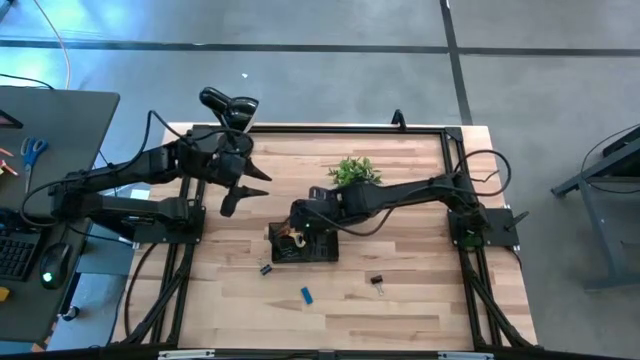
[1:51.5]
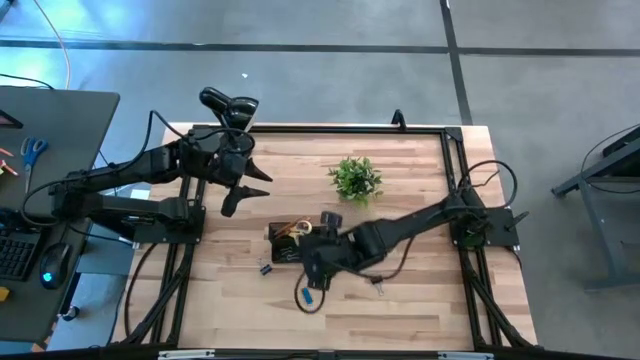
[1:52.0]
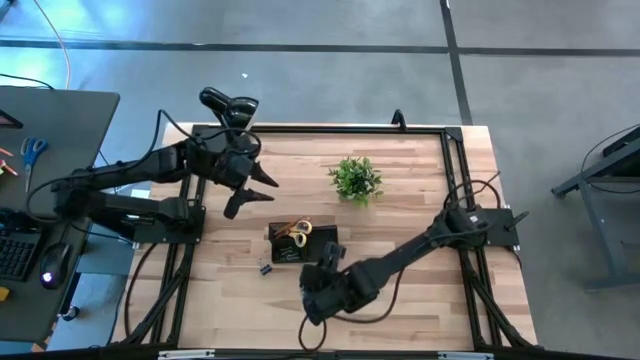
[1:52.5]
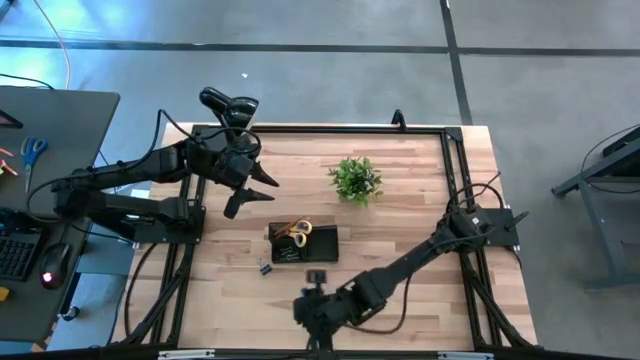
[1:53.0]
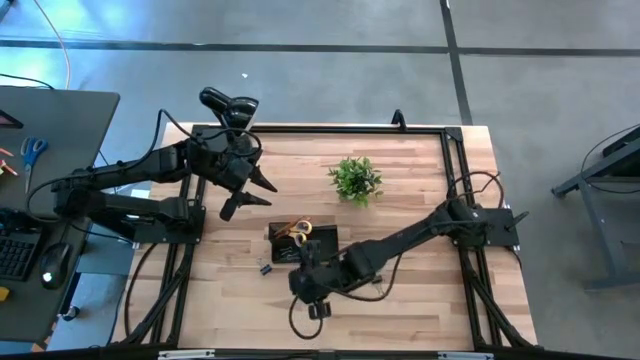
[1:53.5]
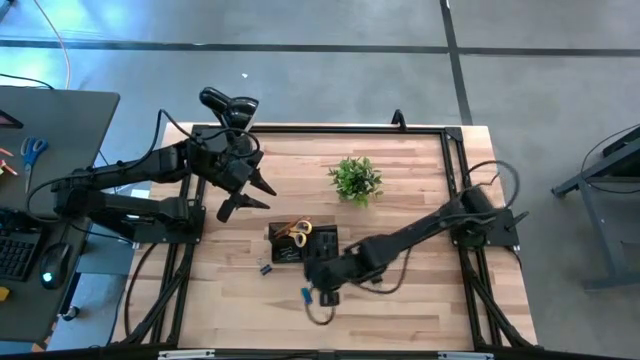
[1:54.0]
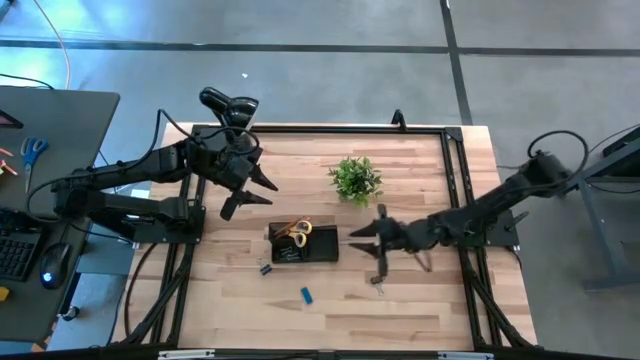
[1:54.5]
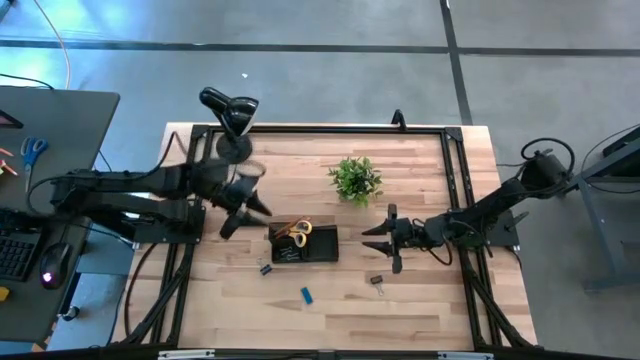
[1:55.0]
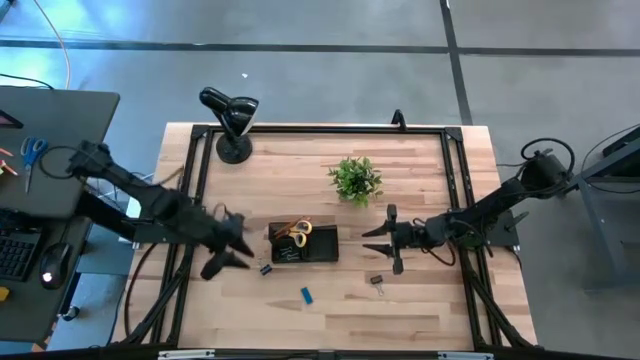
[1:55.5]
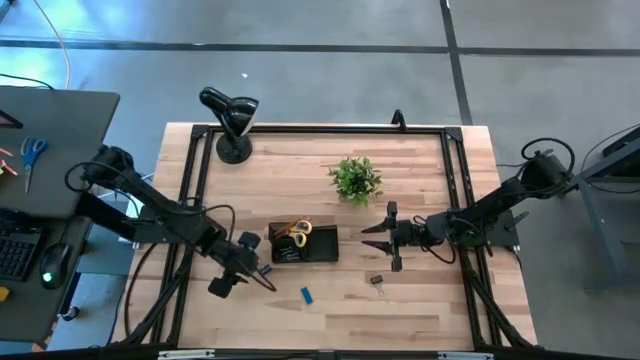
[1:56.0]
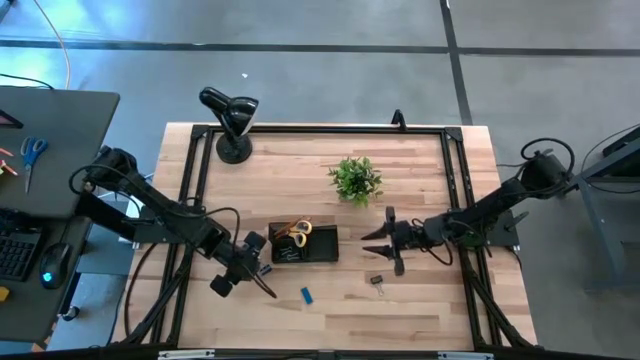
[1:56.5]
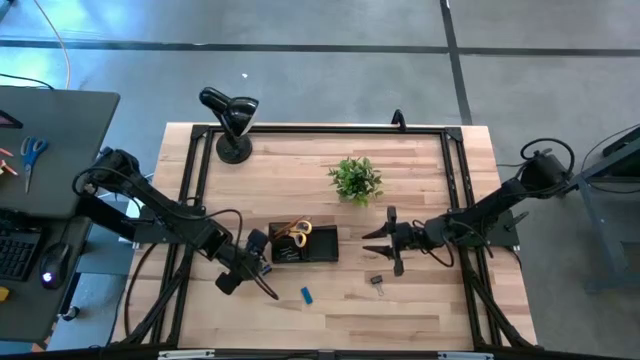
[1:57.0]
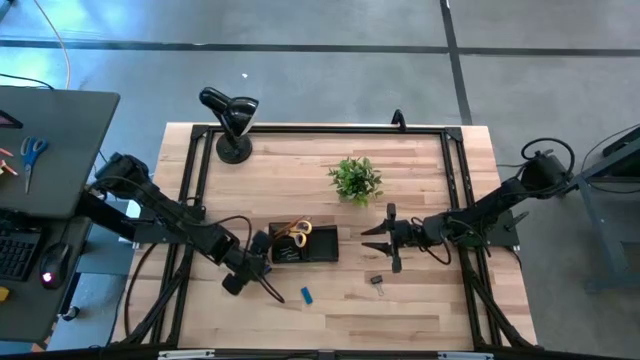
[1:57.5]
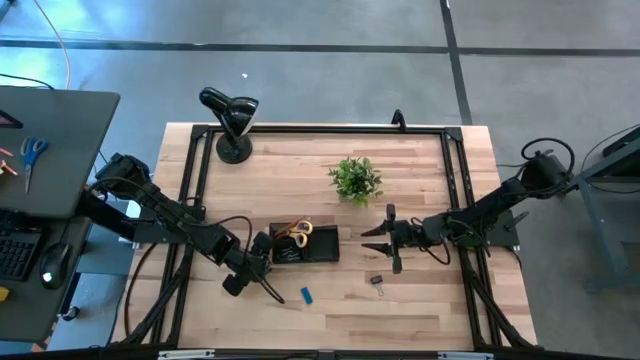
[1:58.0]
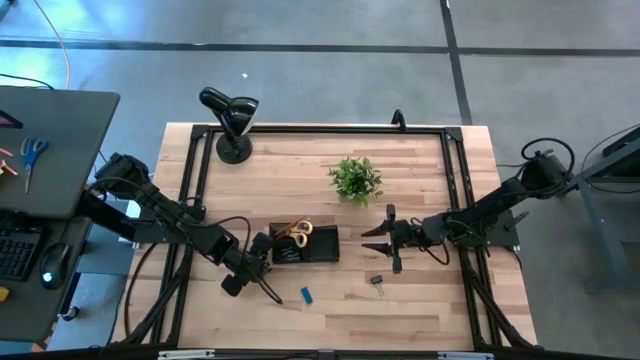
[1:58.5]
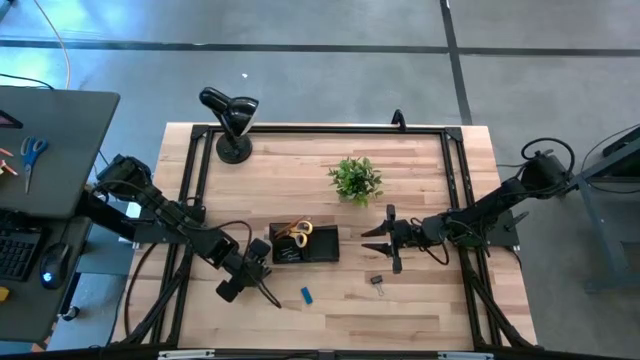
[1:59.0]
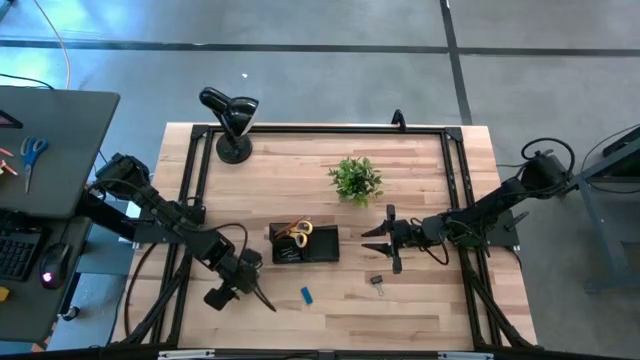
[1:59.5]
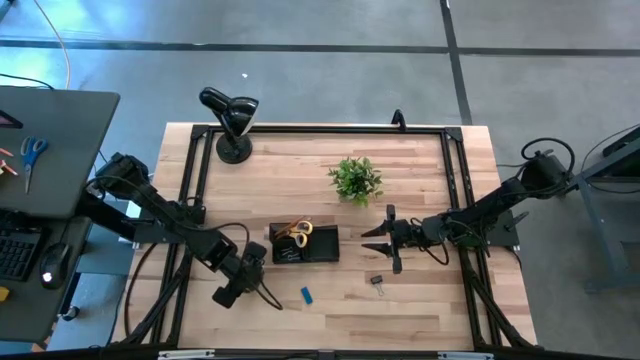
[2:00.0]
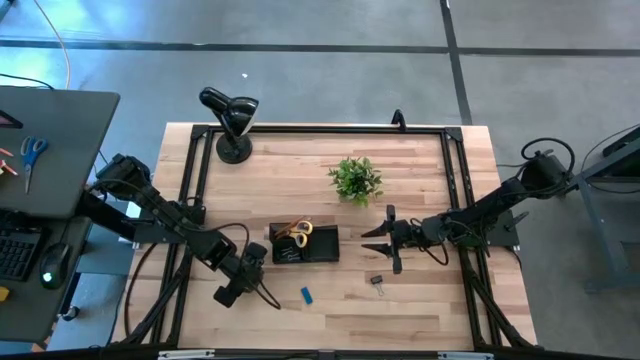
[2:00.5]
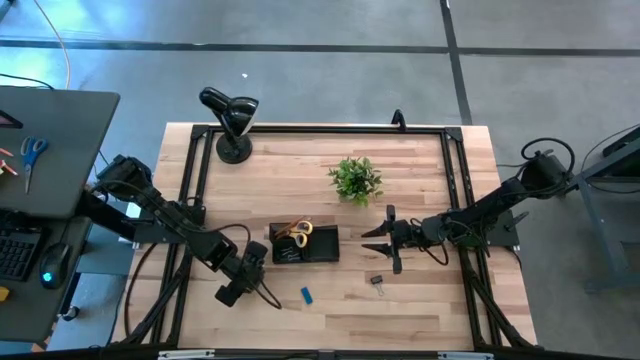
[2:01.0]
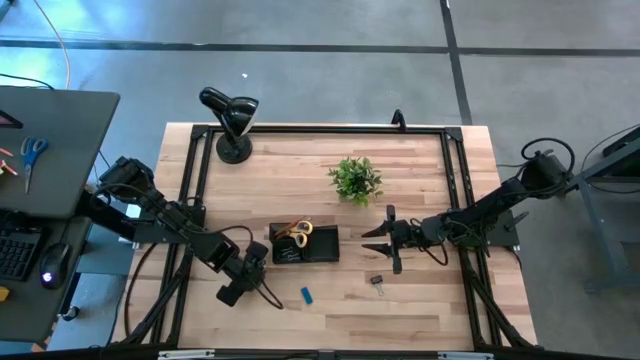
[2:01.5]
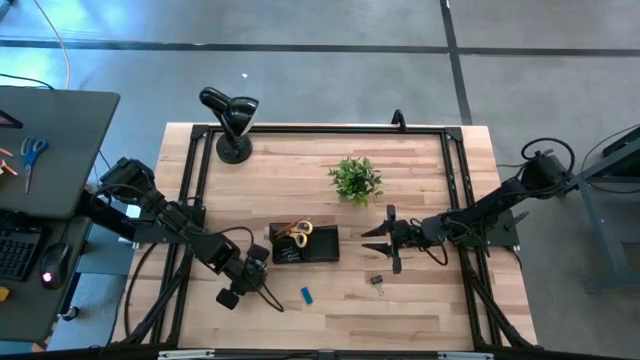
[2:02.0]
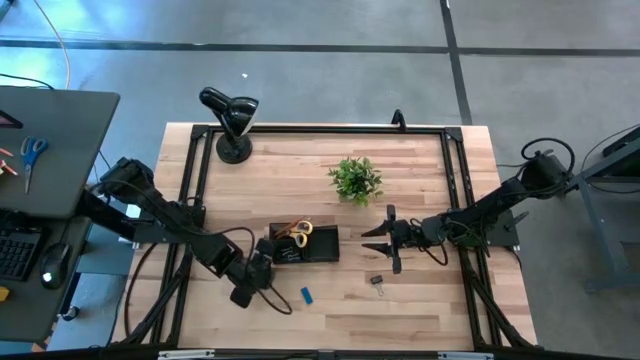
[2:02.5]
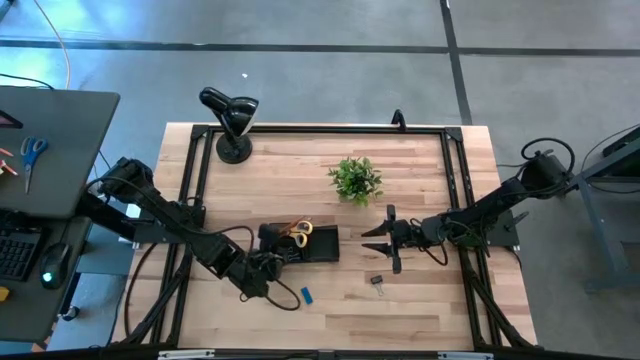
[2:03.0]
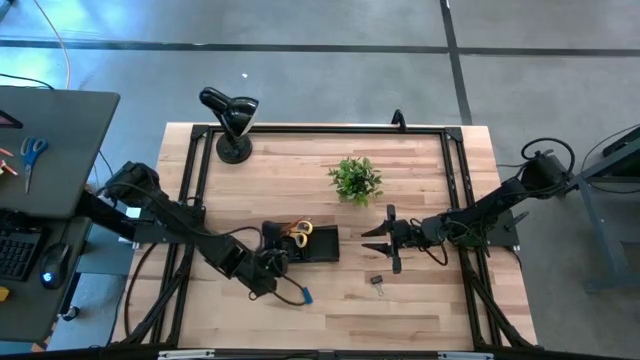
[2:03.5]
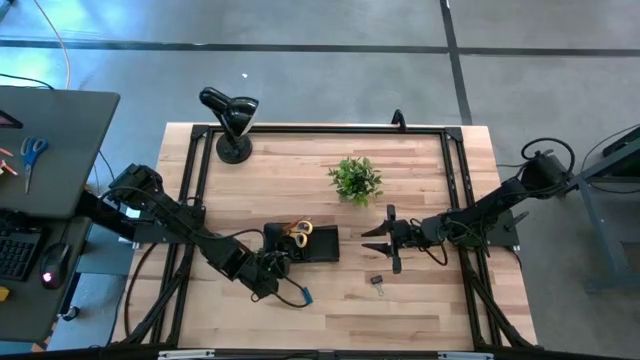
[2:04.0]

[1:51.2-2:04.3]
Task: Pick and place office supplies into organizer
Put the black binder clip into the black desk organizer

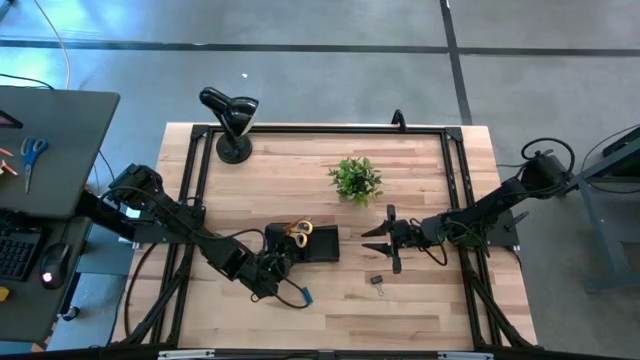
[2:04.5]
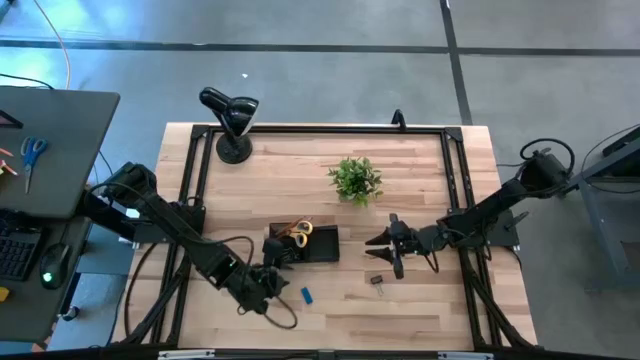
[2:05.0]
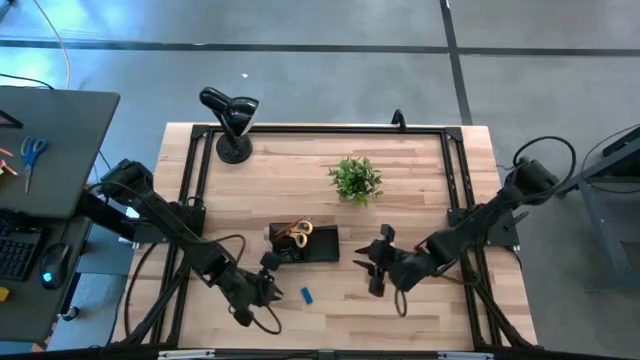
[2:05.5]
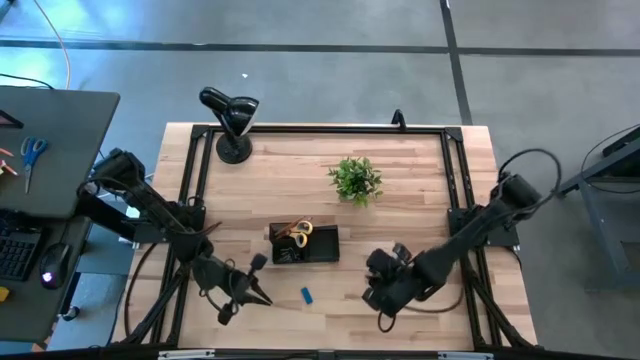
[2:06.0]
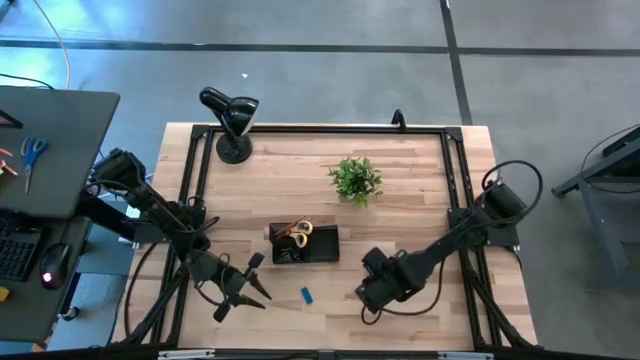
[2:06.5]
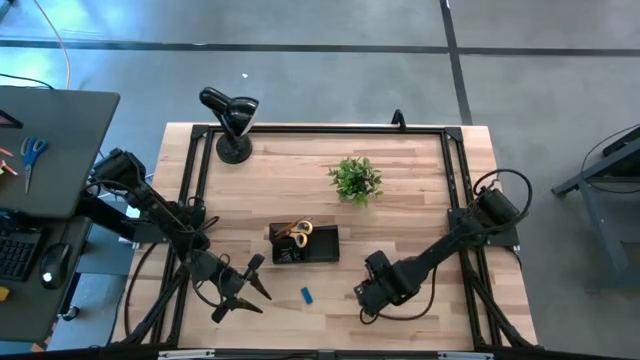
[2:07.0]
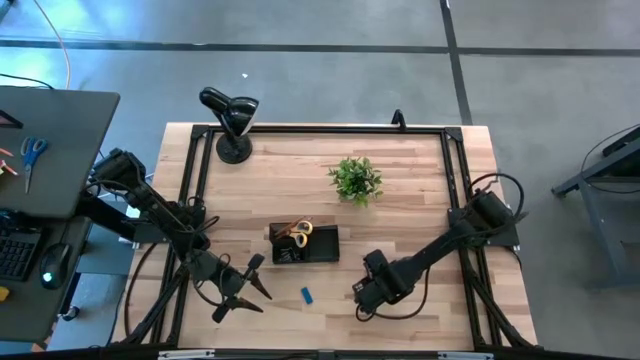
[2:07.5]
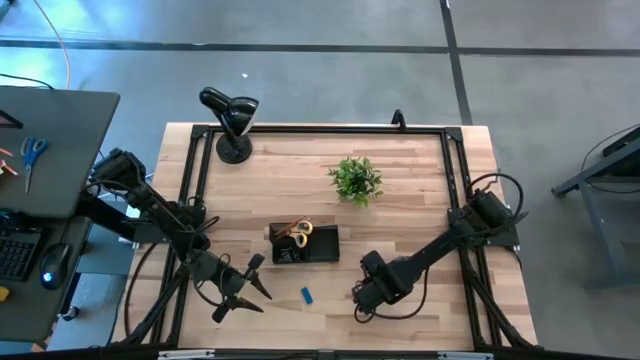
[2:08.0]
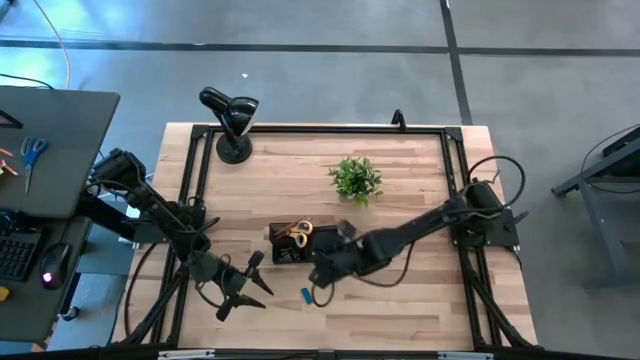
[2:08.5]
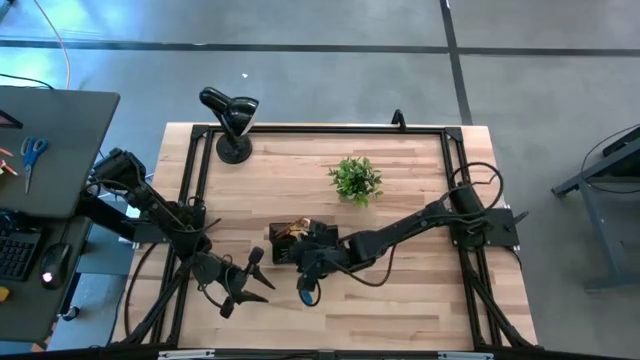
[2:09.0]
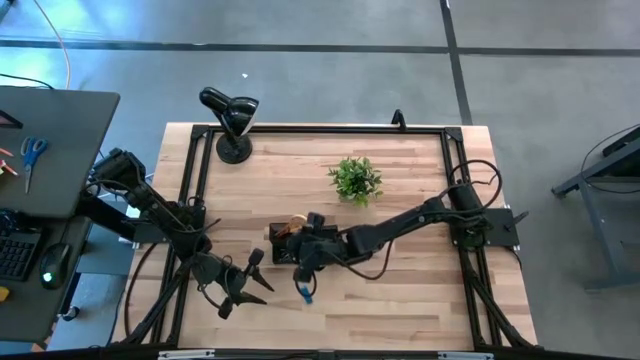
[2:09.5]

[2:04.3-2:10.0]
Put the black binder clip into the black desk organizer

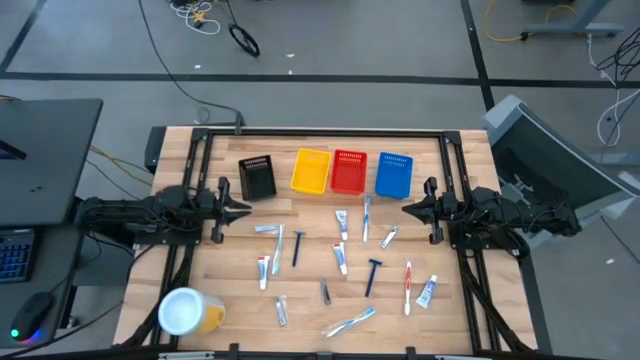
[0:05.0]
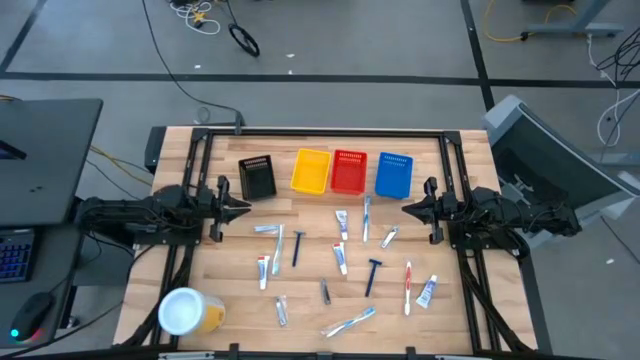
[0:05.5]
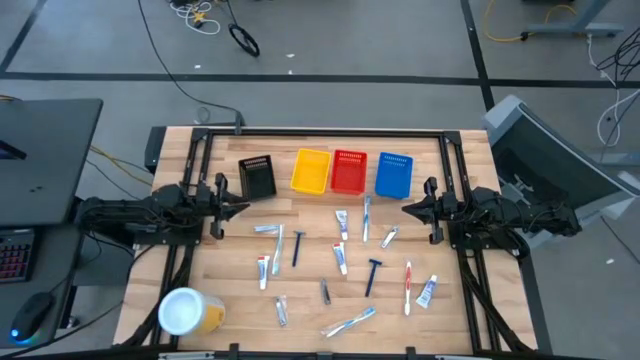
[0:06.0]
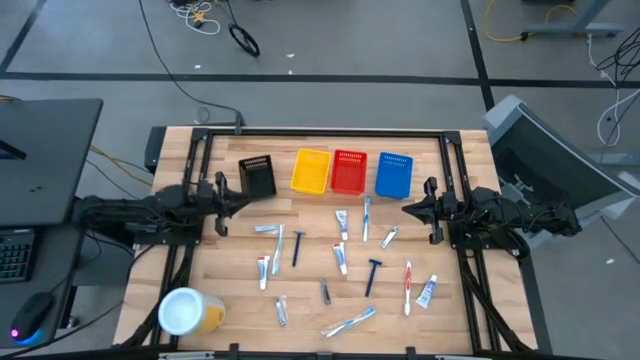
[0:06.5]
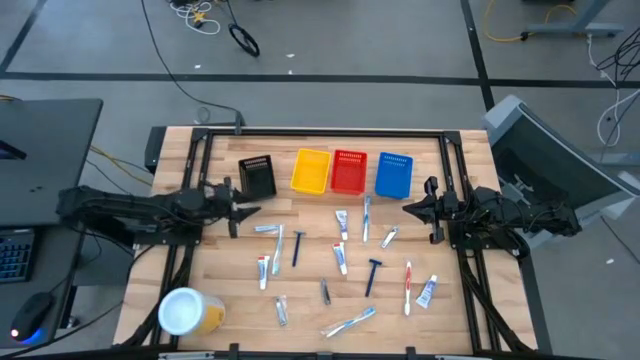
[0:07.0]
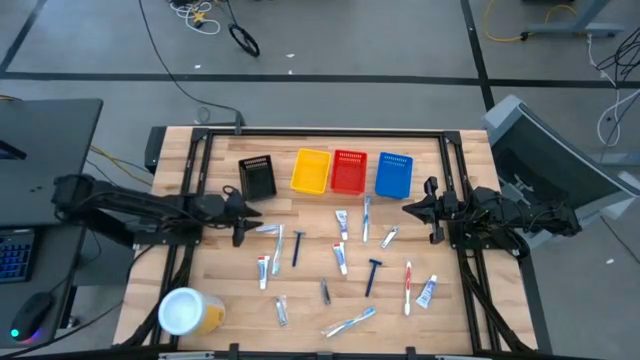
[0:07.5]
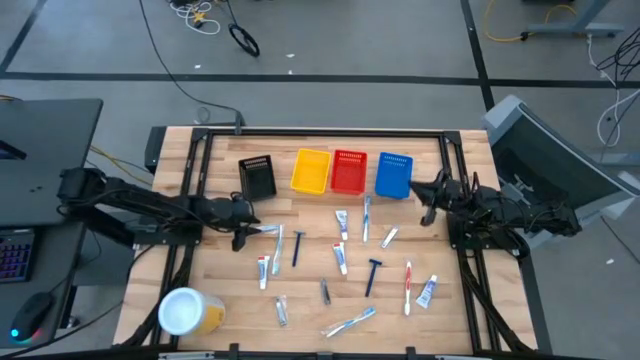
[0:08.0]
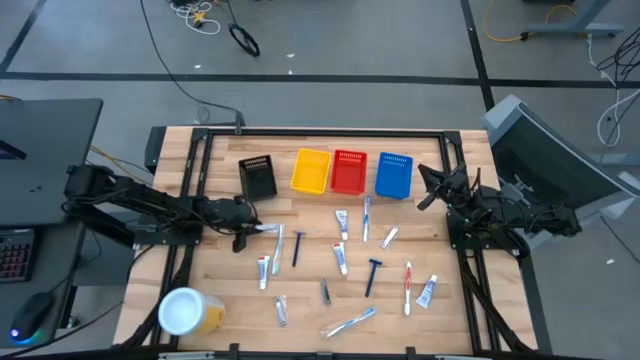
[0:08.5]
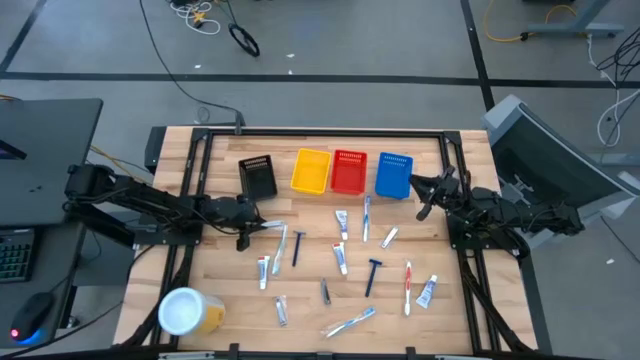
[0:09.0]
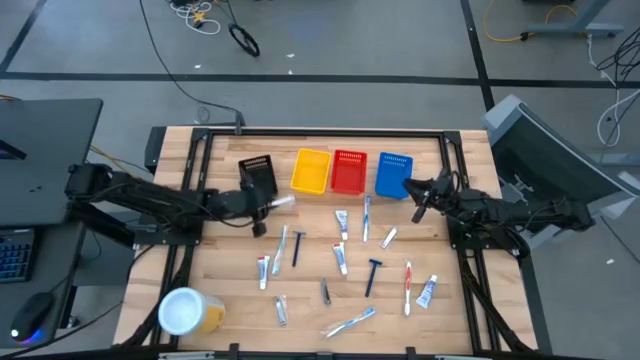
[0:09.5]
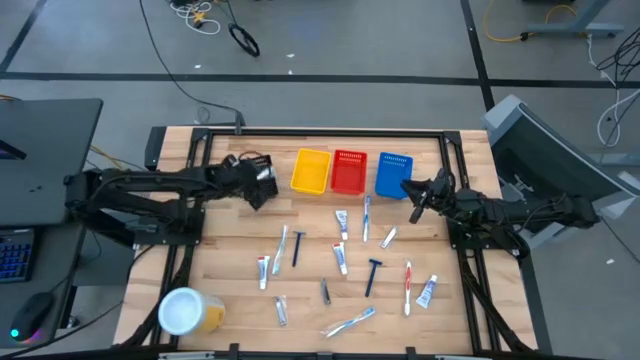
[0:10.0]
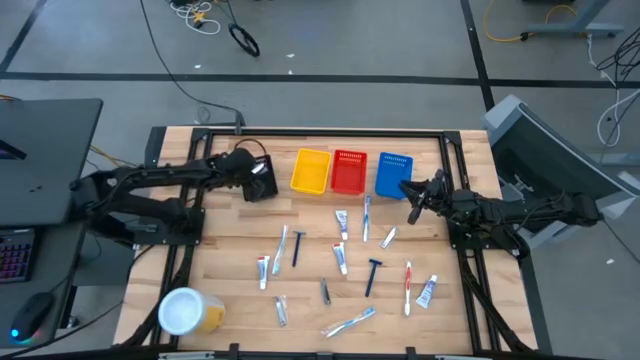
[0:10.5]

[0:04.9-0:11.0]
Task: Pick & Place Travel size toiletries
Put the silver nail cutter into the black bin
